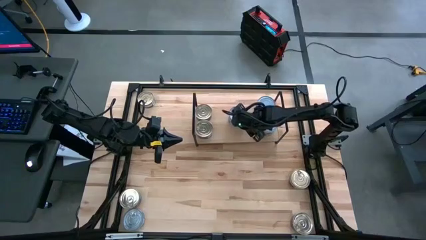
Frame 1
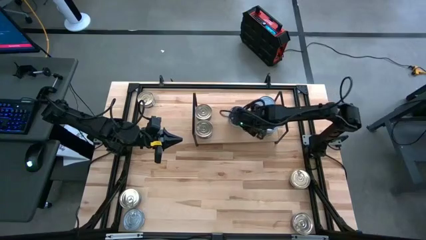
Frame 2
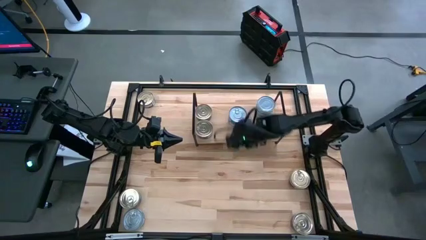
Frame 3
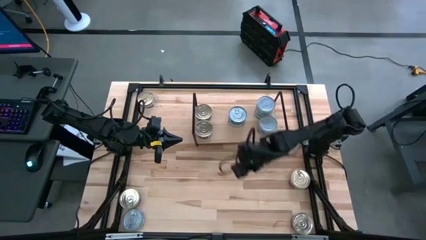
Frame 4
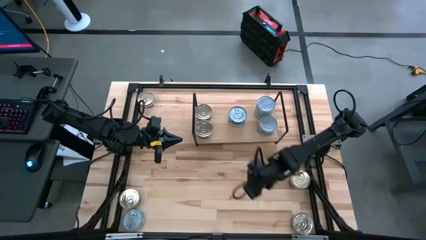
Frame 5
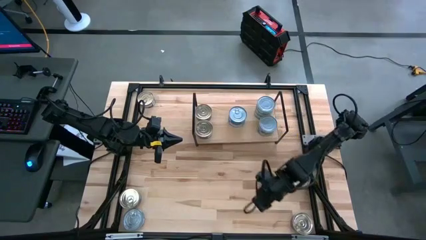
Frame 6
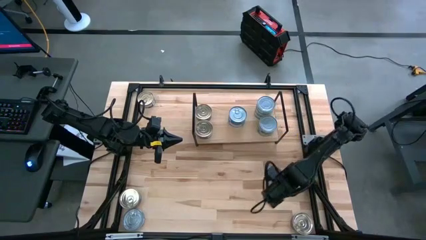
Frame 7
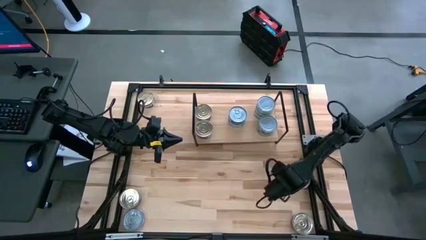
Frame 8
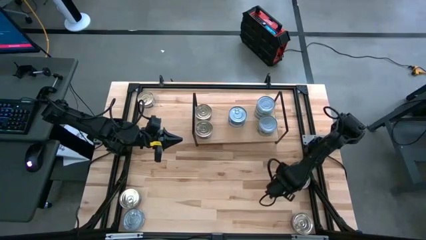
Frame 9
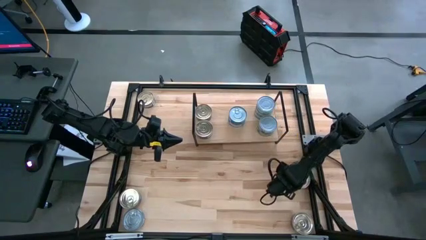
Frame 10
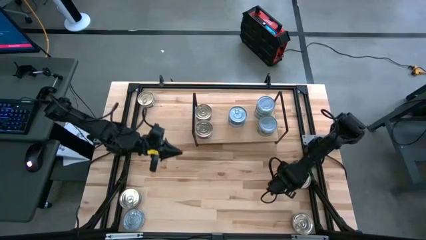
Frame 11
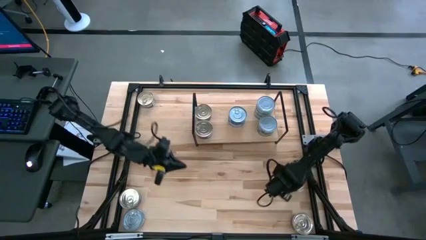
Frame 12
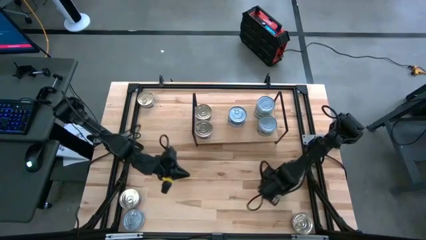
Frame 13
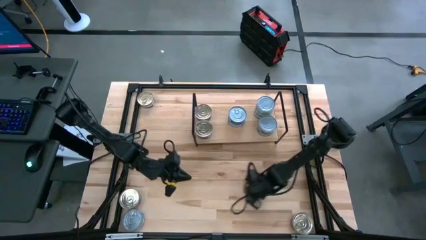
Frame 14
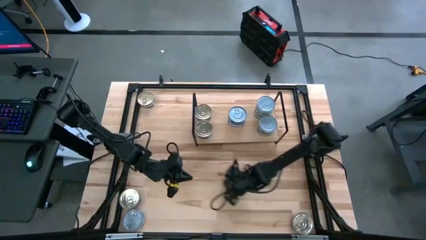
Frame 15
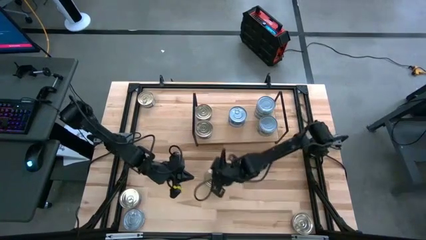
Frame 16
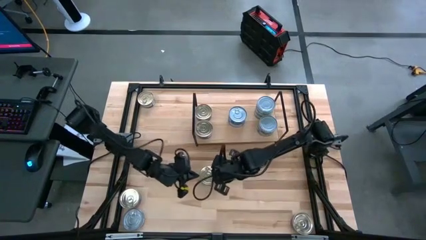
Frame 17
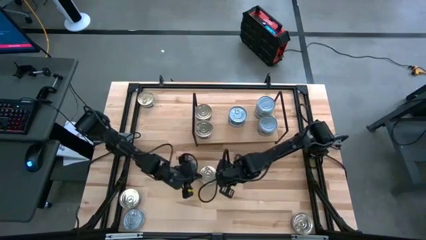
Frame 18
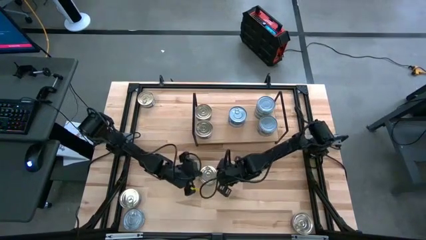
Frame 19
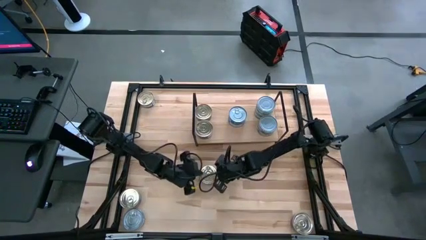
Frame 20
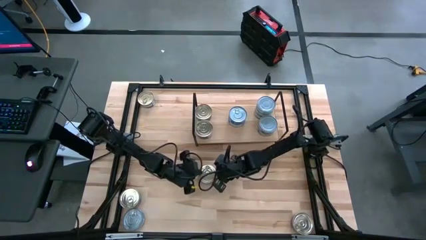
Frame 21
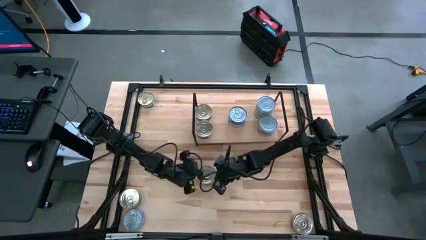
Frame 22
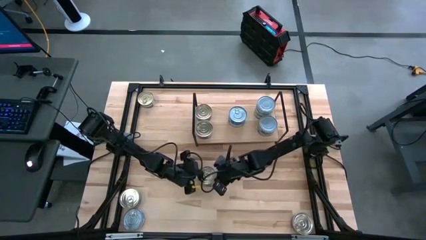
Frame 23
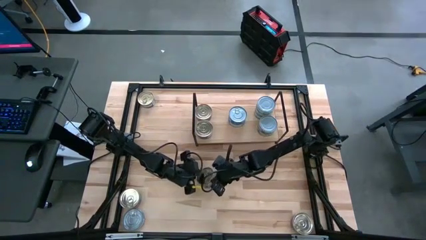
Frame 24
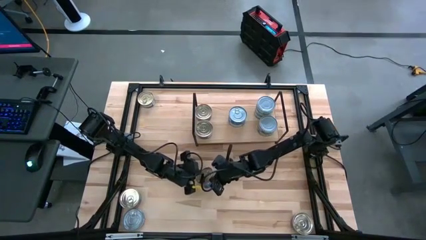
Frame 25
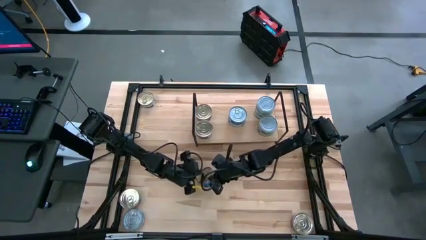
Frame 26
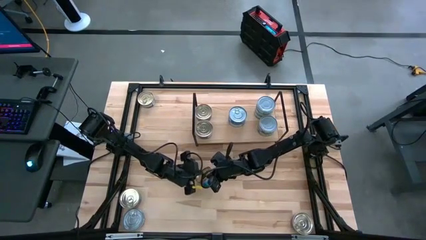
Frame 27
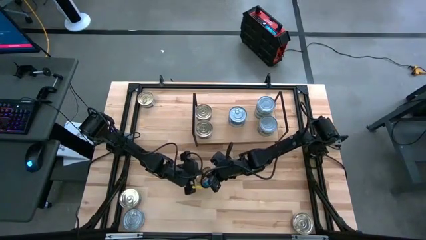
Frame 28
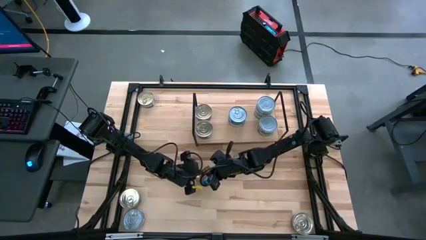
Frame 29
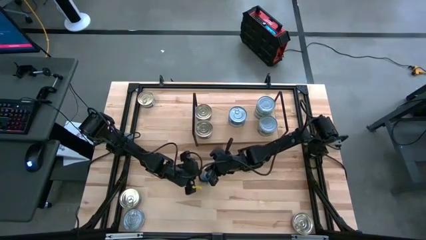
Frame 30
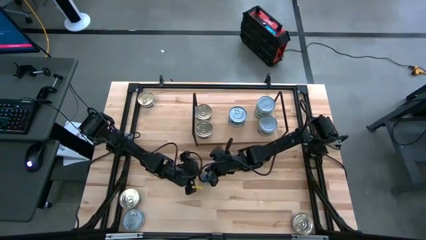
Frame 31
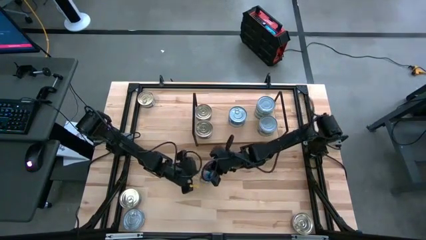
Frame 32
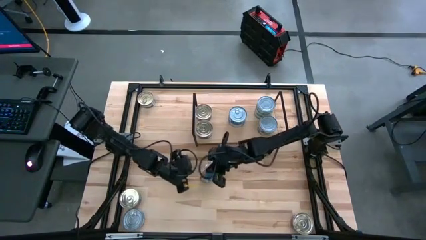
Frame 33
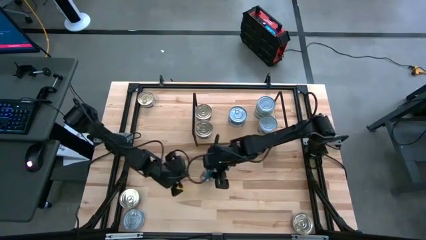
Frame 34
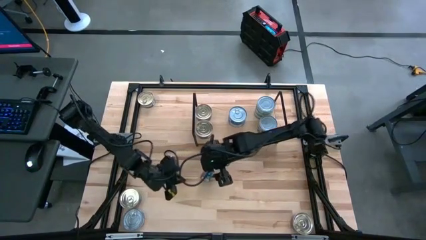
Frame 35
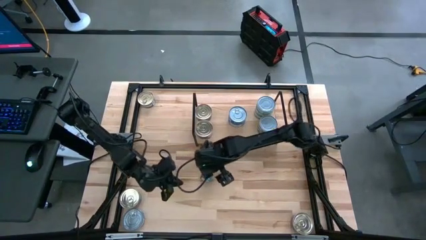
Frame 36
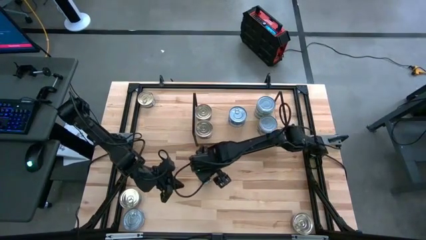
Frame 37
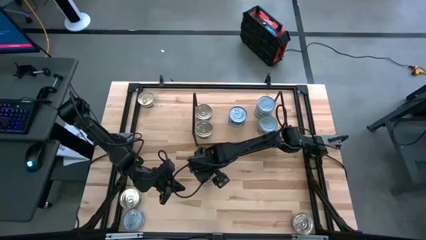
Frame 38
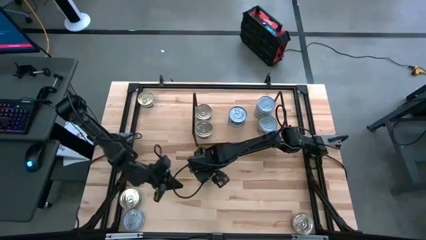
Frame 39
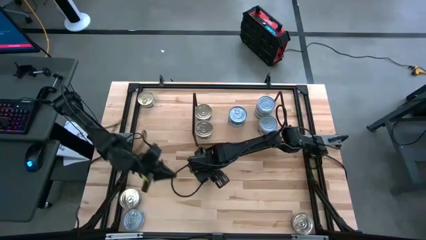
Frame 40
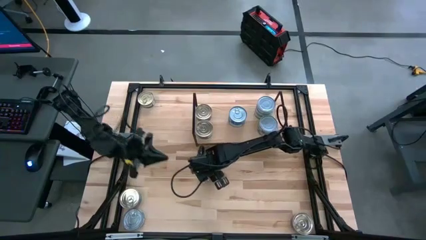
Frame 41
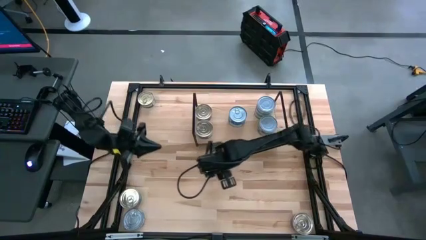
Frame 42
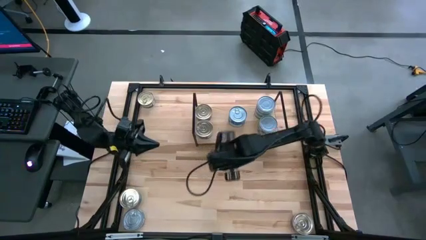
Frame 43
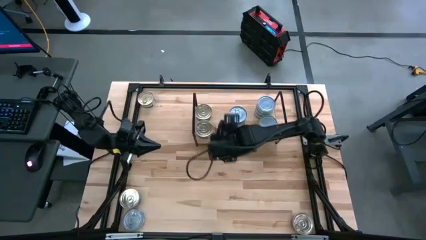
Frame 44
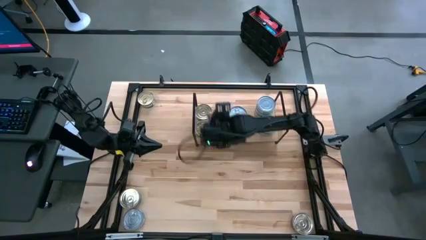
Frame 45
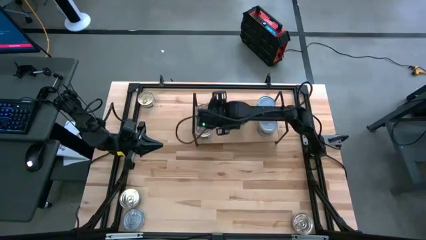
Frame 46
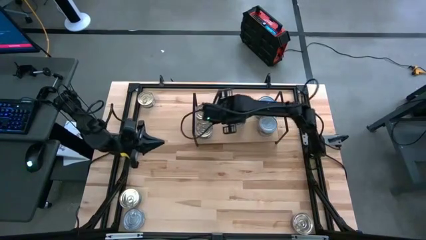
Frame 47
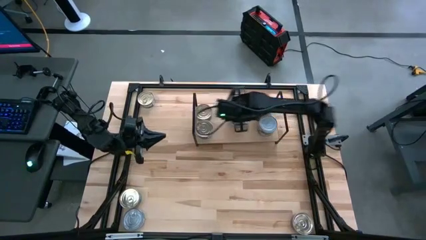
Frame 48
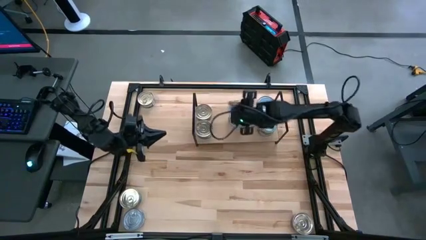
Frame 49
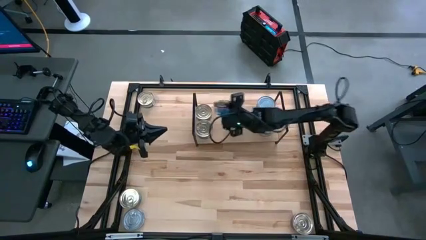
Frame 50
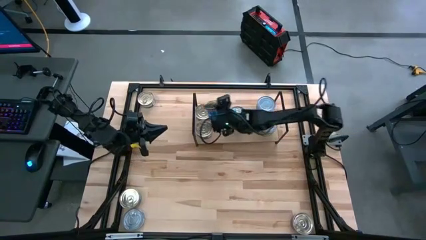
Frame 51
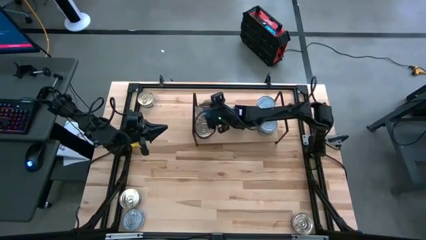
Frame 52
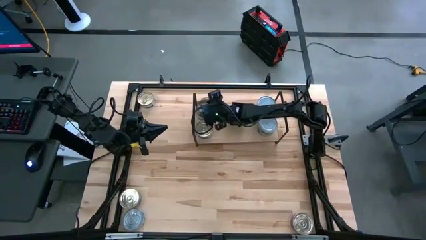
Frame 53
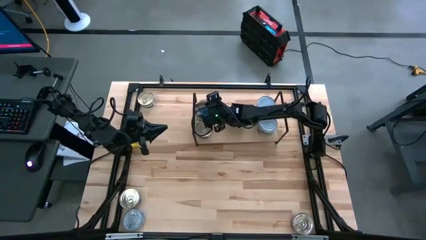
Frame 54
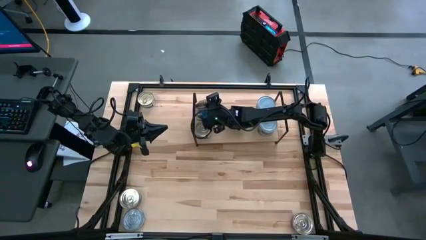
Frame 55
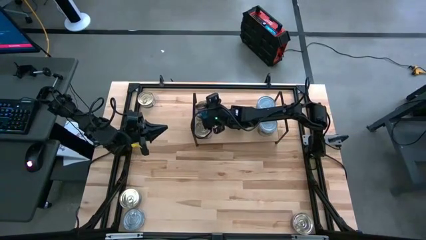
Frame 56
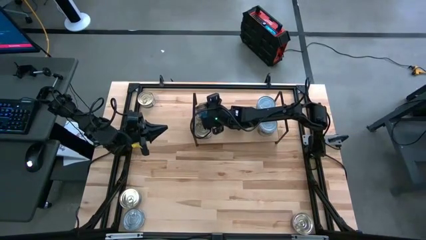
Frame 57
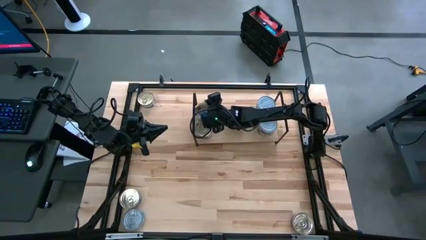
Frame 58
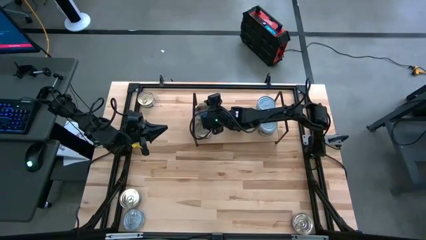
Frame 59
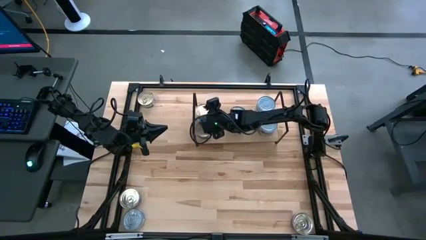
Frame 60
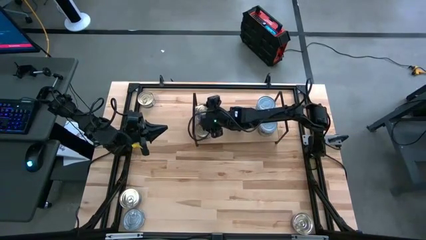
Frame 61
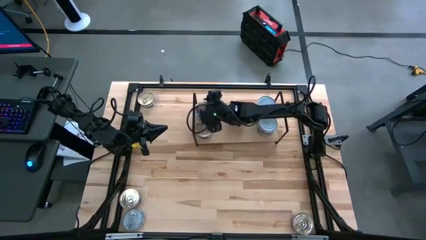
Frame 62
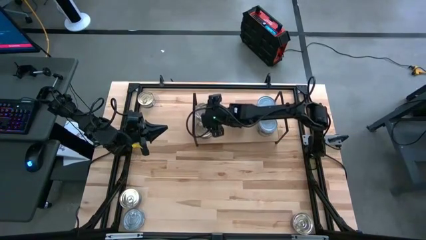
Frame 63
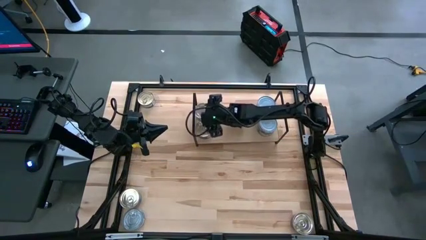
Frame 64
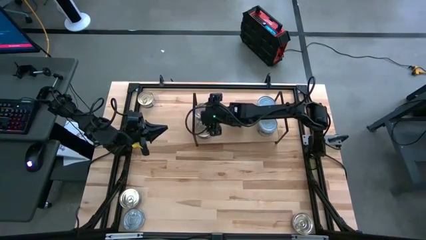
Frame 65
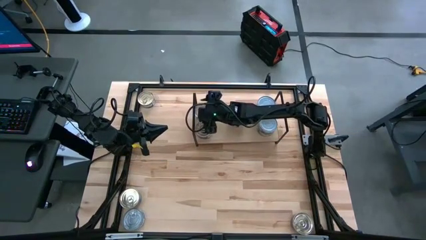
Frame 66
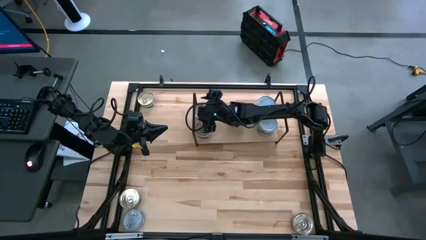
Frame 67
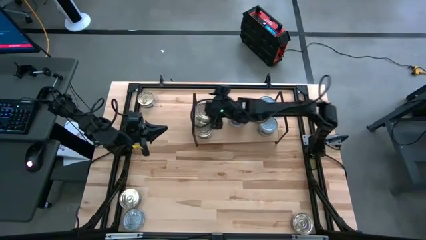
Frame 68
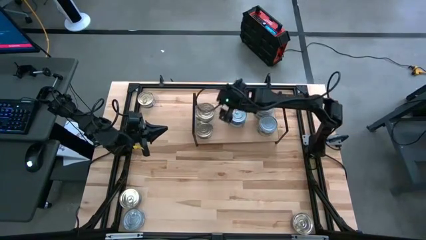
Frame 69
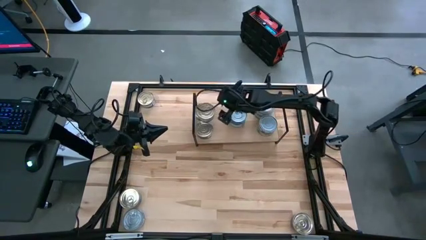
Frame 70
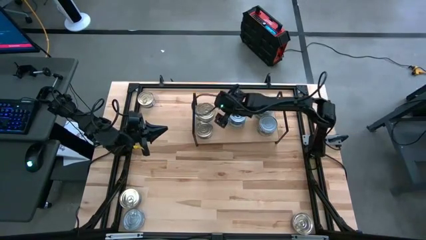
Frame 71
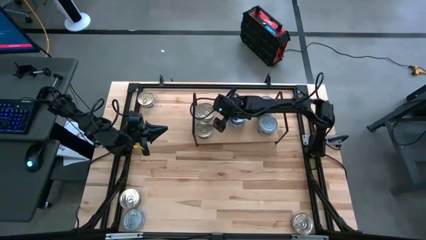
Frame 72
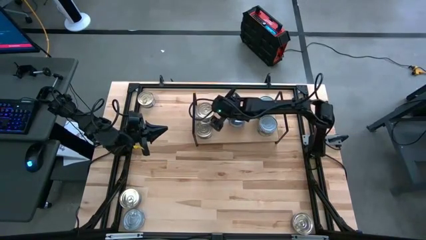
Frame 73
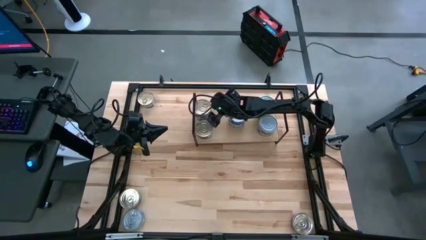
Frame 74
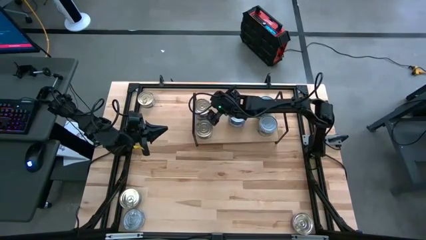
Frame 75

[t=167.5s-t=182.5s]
Task: Stack canned seafood by type on shelf
Stack the blue-pink tuna can on top of the other blue-pink tuna can on the shelf
